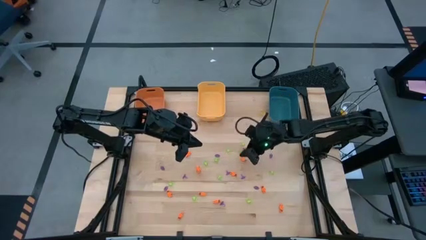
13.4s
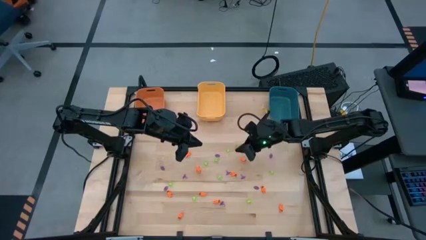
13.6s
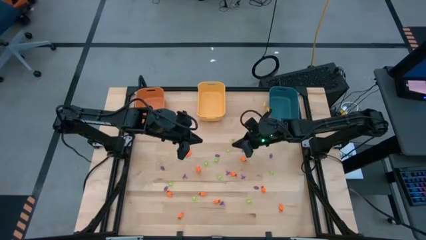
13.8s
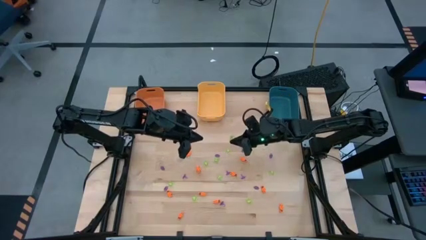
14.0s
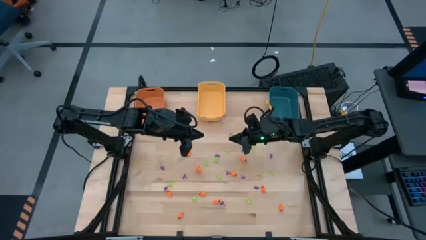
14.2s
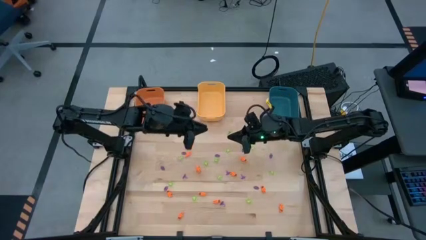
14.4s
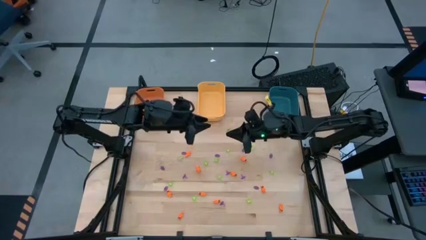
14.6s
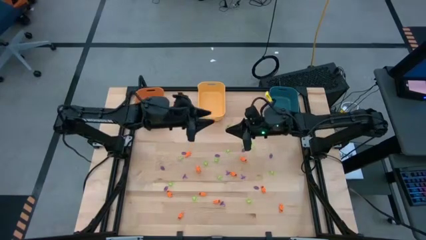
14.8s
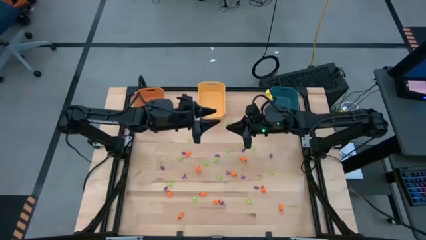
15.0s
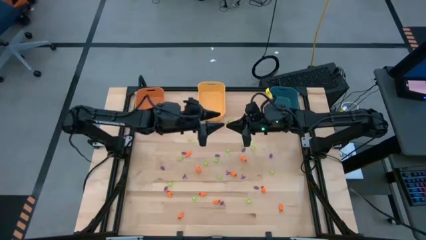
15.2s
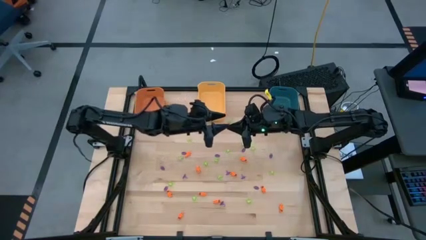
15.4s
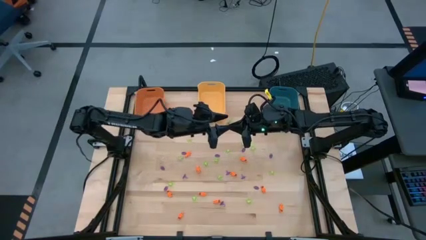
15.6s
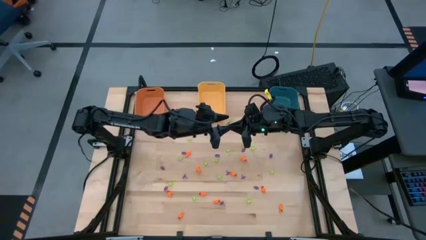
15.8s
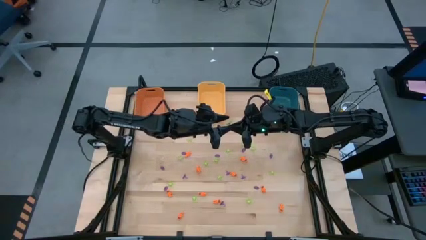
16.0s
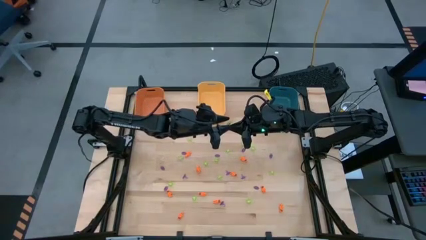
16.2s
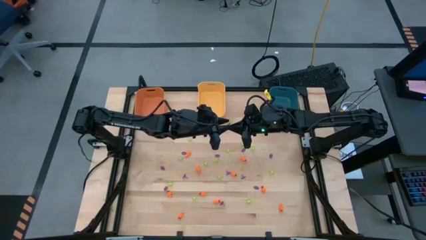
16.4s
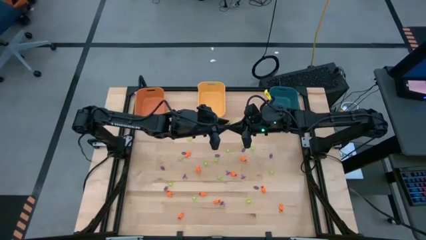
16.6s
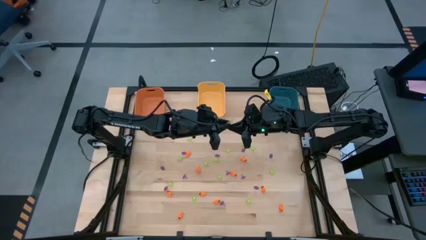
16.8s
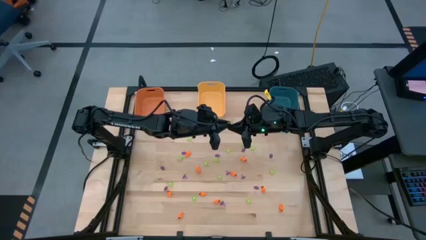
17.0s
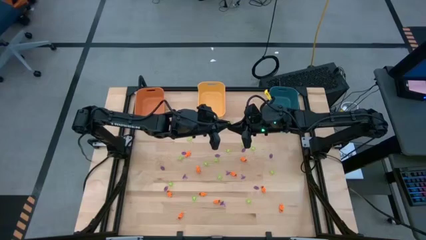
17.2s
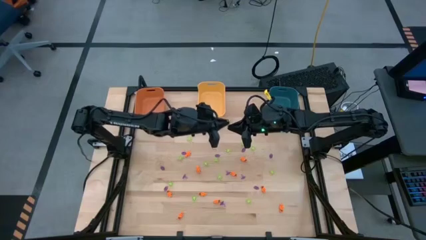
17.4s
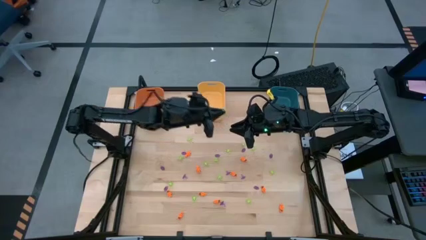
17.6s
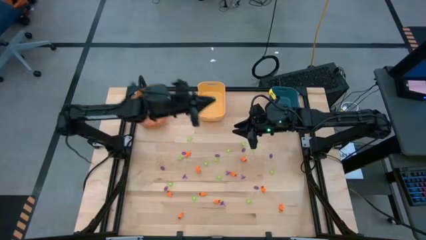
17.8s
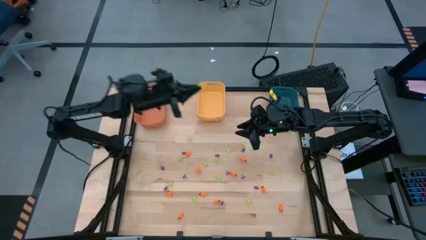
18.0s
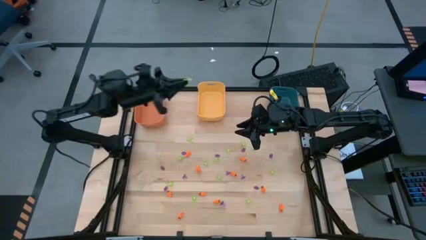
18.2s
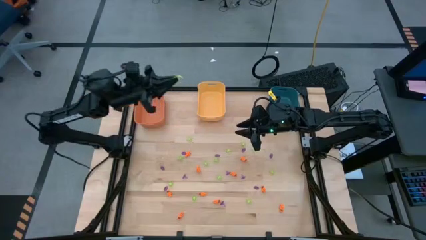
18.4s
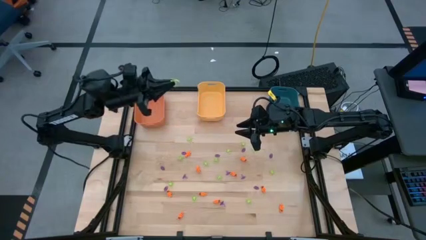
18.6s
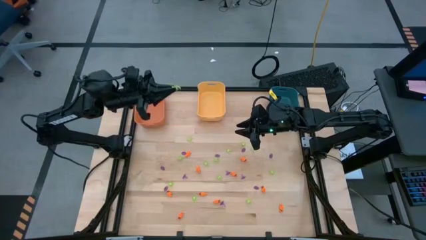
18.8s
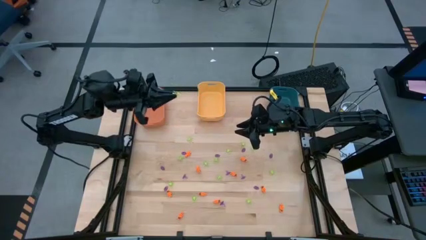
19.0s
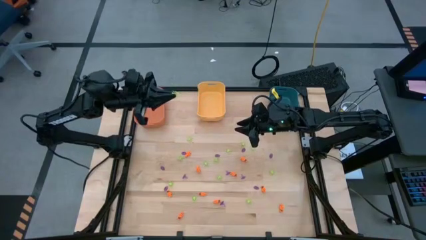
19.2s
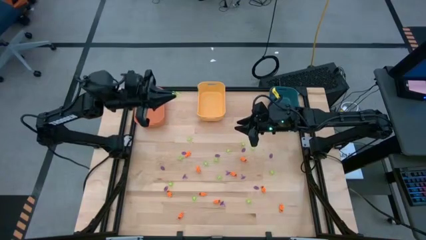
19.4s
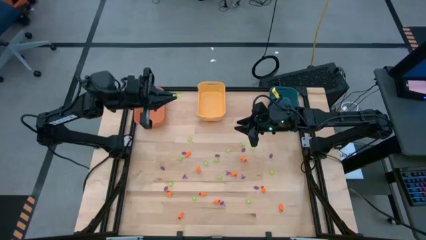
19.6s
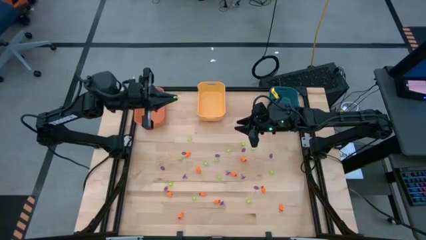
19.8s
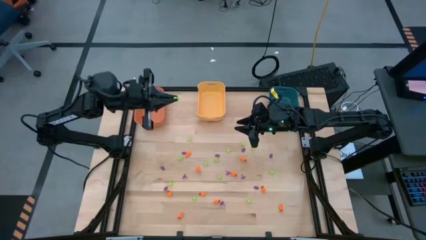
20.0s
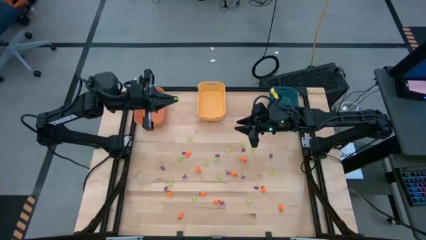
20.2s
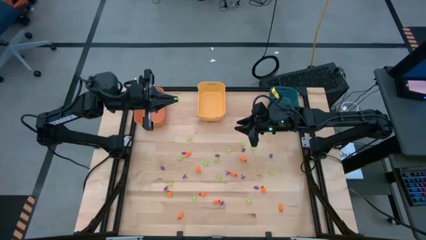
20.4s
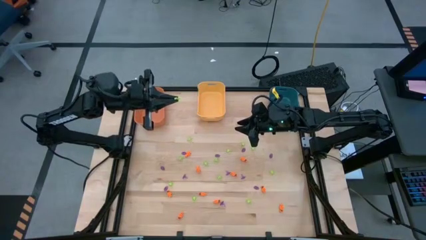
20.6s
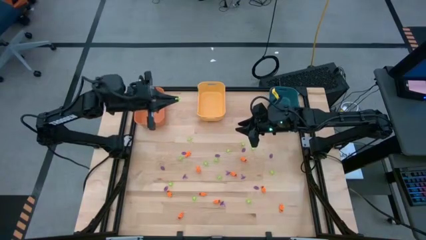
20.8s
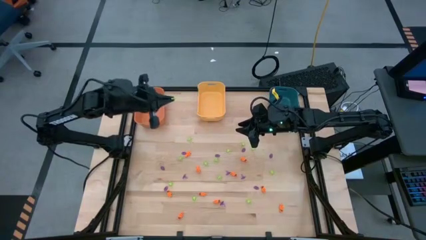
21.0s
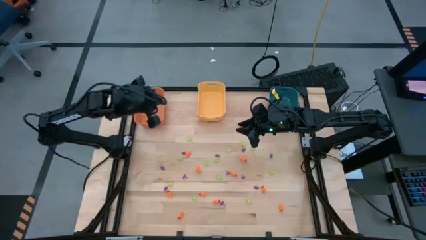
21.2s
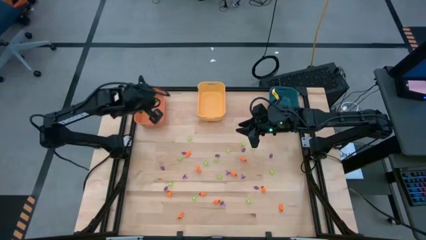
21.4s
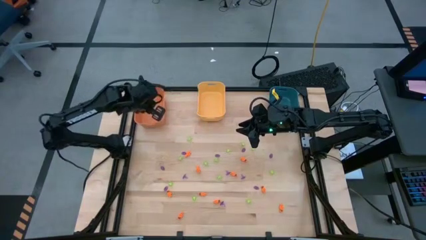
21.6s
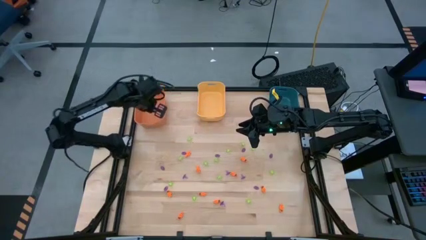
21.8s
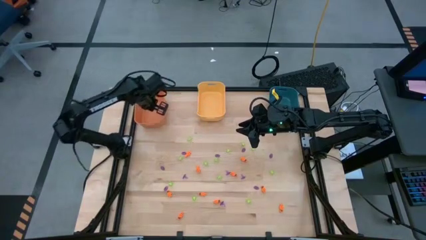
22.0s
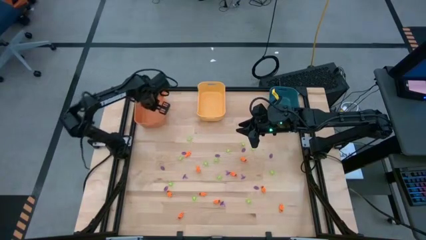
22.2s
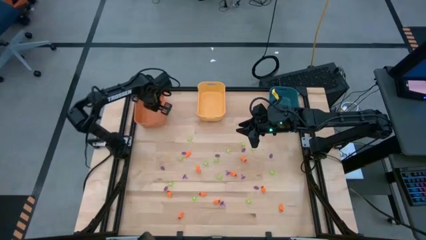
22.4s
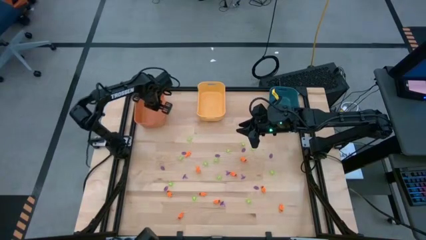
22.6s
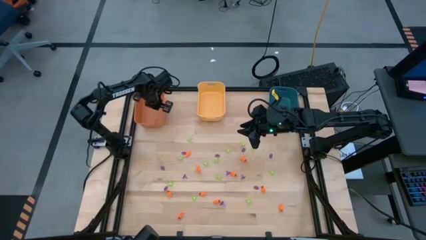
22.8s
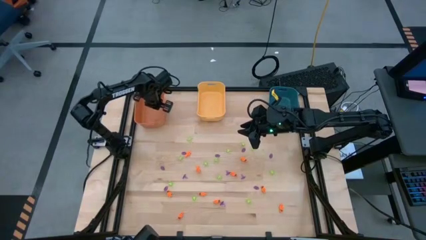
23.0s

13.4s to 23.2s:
Task: Sort Halloween decoration
Put the green spider toy into the orange bin

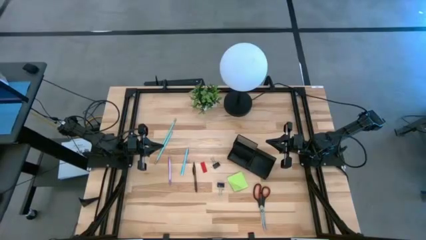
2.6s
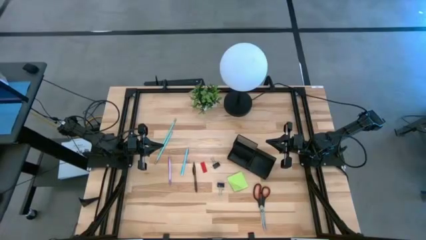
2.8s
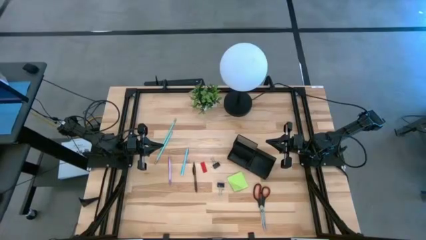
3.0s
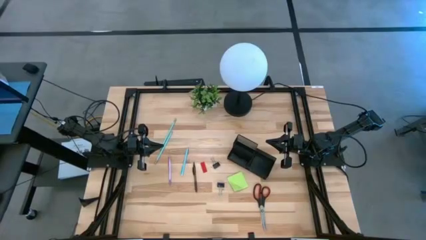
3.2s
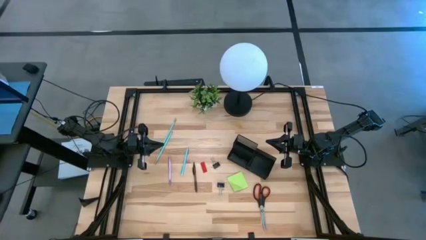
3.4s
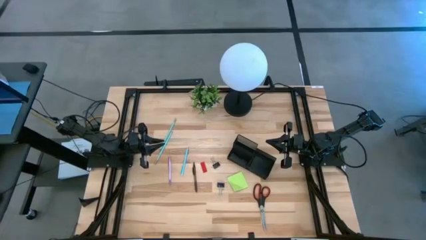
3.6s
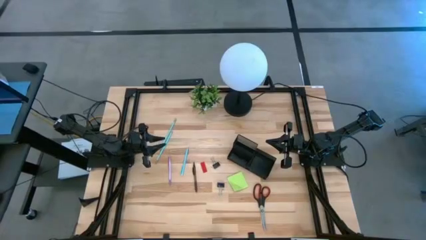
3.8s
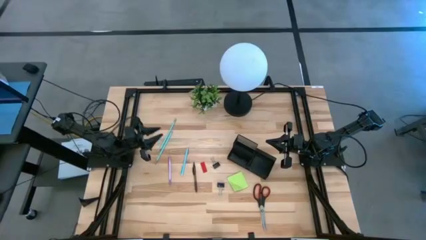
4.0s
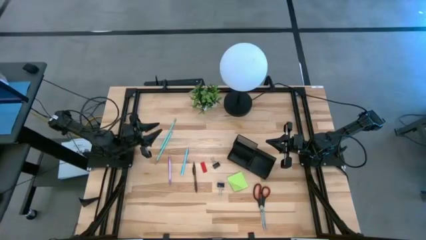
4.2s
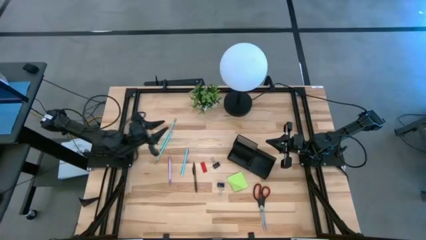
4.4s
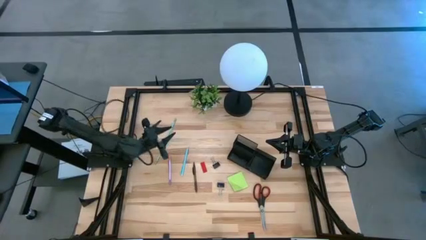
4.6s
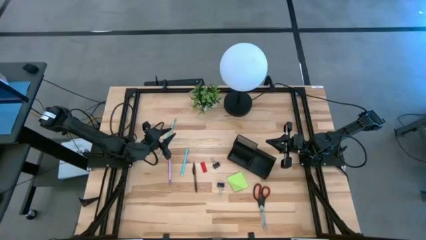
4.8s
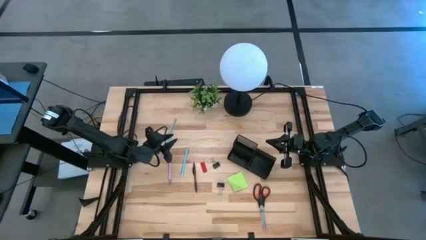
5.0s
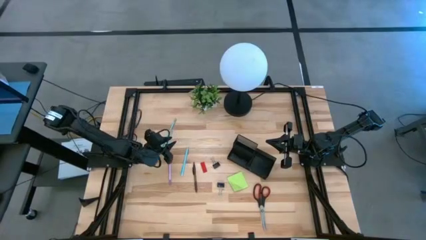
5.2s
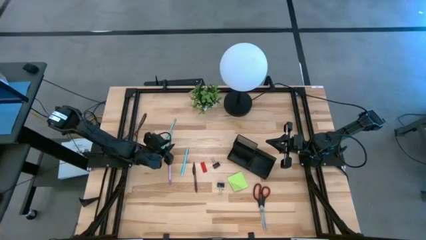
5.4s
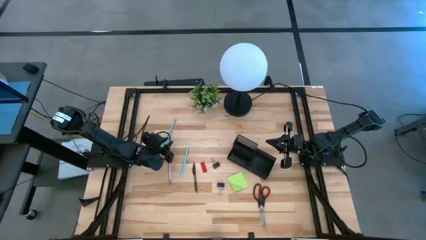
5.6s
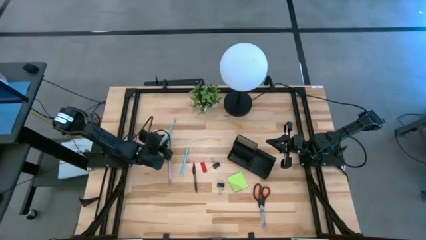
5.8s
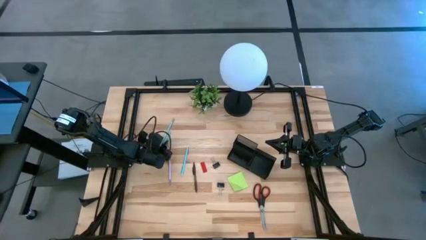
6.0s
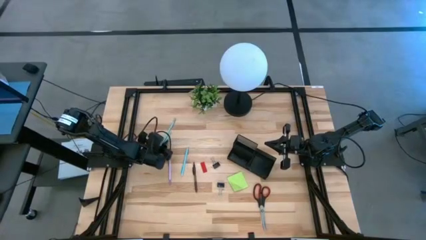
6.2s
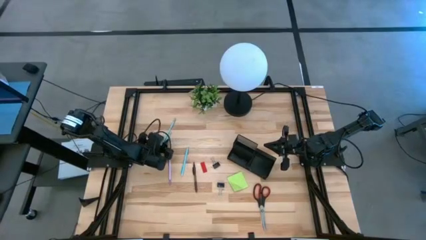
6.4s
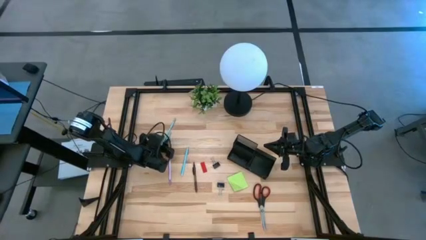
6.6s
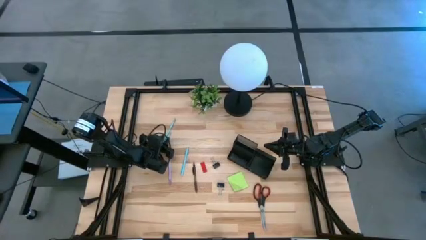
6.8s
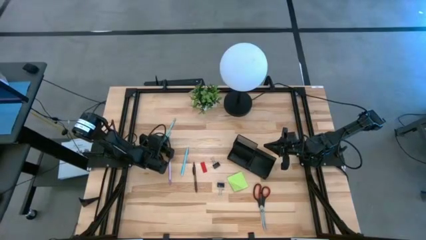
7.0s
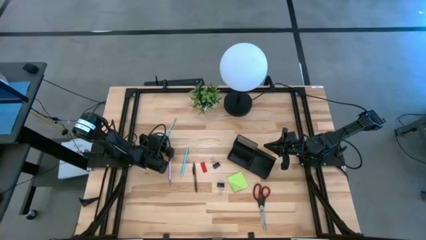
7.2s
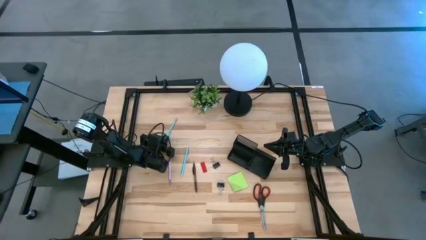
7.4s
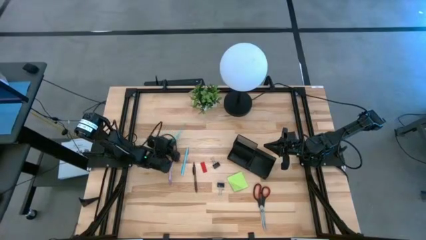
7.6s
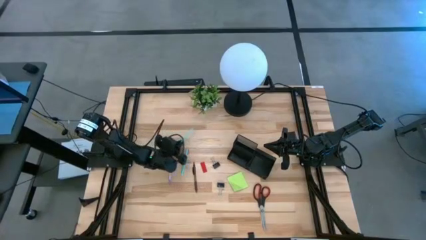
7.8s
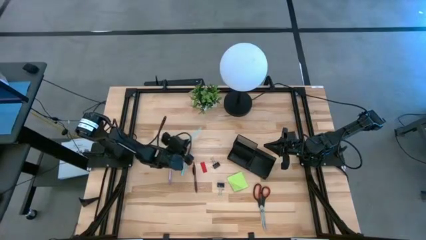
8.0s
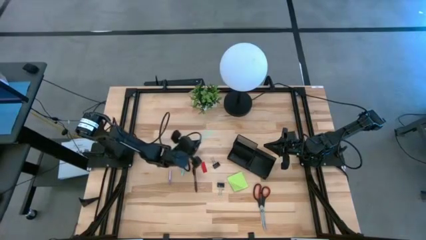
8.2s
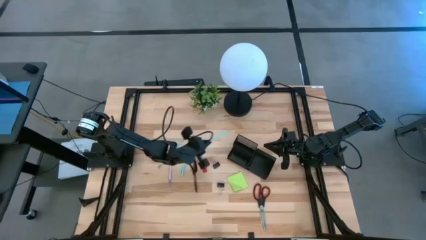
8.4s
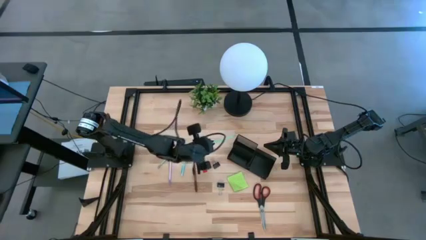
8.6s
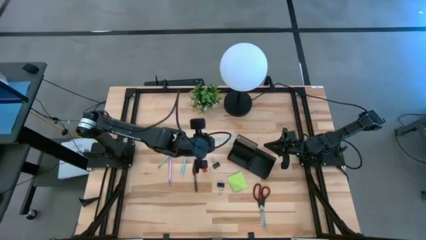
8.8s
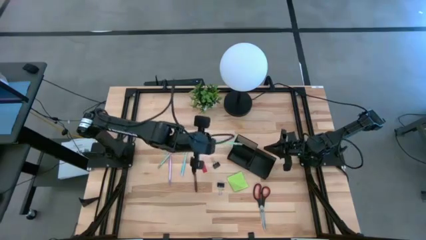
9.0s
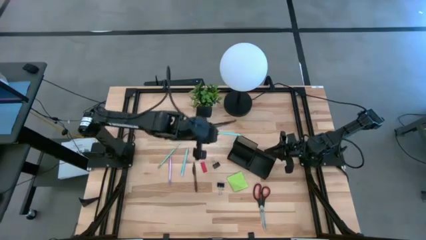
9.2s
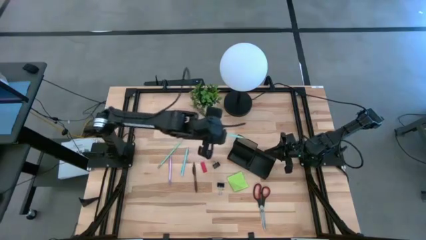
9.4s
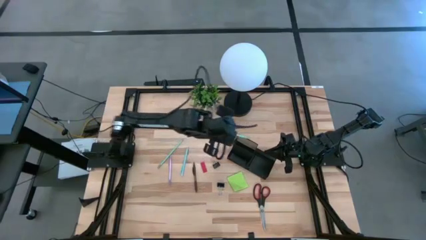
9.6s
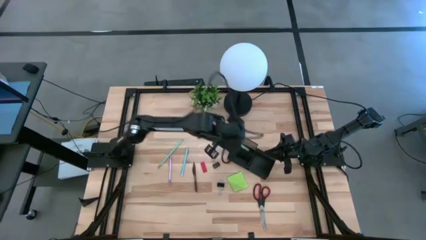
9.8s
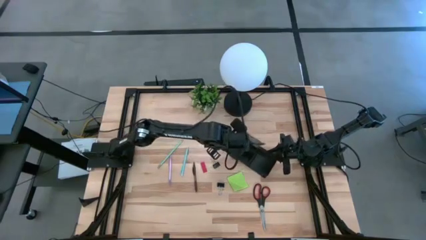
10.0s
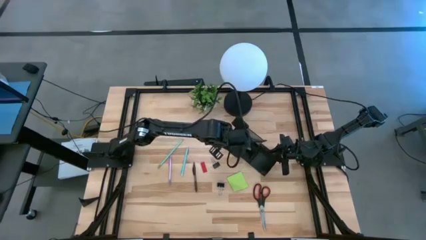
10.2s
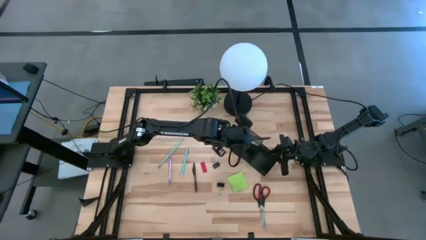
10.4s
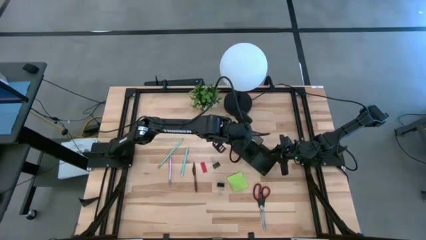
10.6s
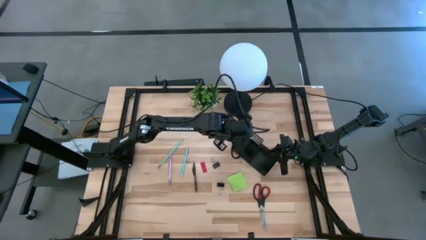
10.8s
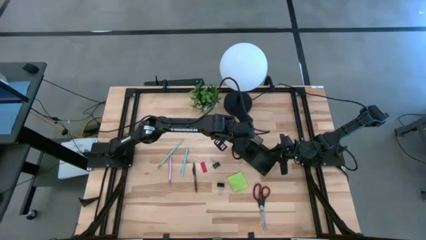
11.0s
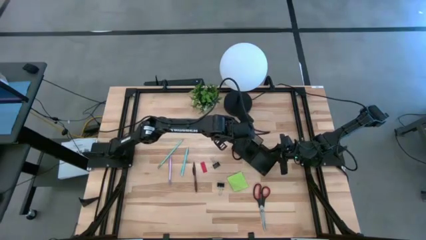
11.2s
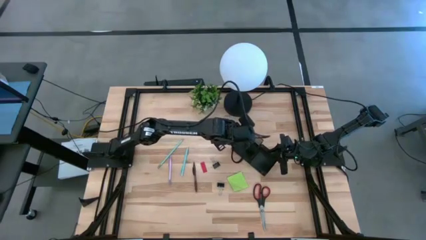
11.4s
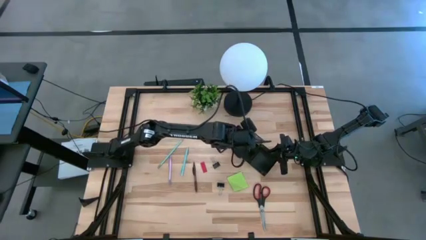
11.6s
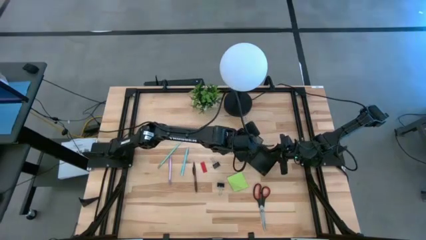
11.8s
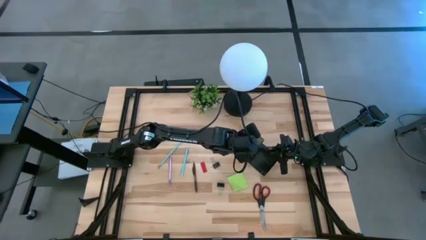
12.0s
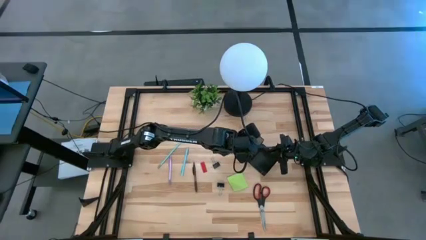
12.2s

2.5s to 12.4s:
Task: Pick and place office supplies into organizer
Put the light blue pencil into the desk organizer
